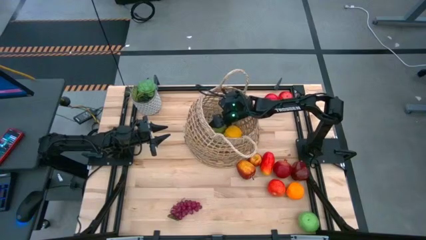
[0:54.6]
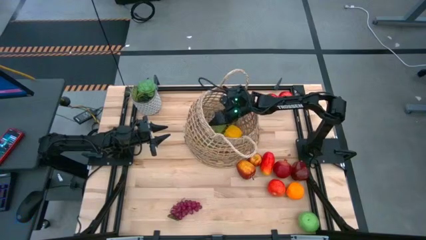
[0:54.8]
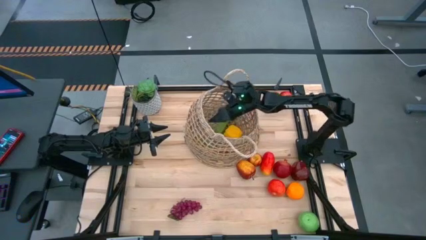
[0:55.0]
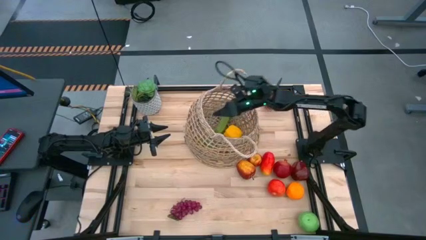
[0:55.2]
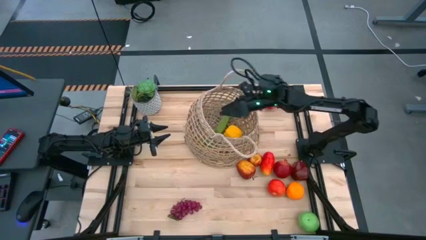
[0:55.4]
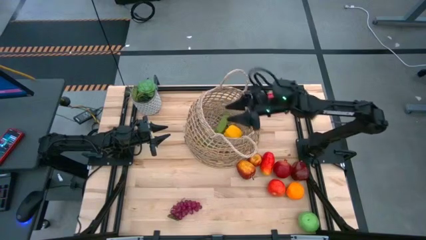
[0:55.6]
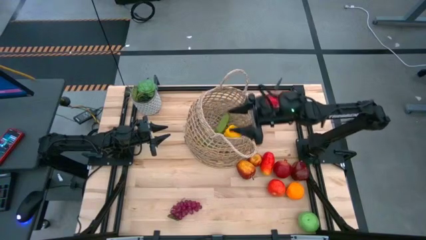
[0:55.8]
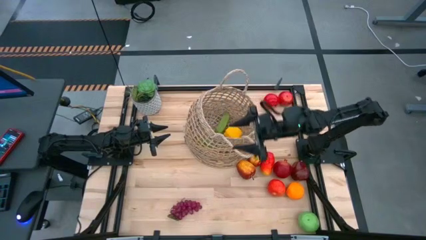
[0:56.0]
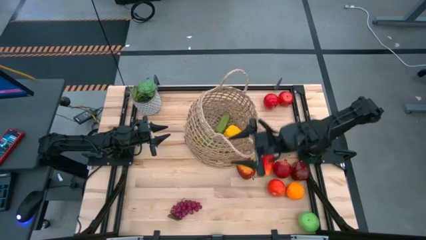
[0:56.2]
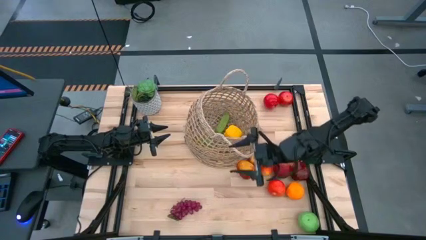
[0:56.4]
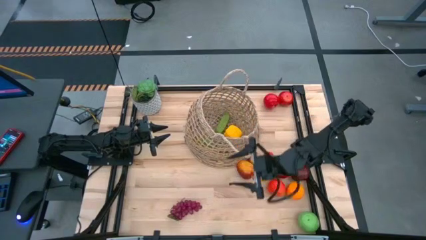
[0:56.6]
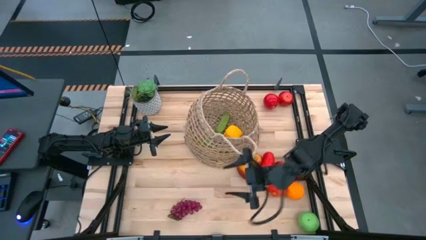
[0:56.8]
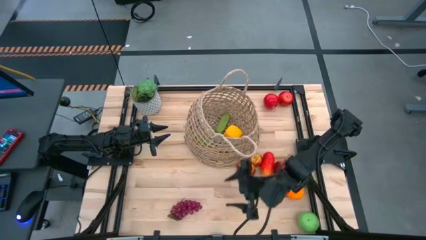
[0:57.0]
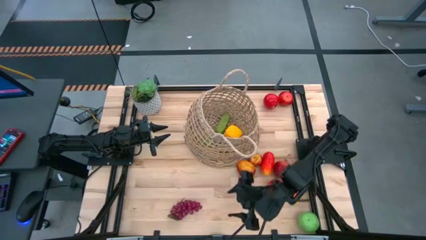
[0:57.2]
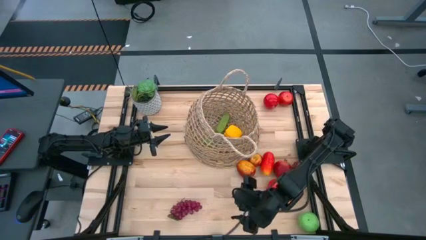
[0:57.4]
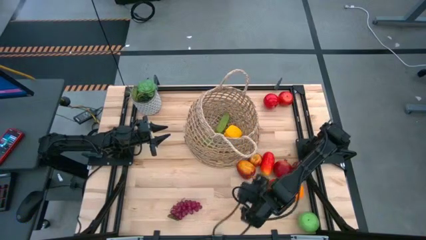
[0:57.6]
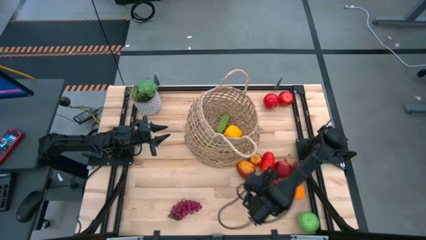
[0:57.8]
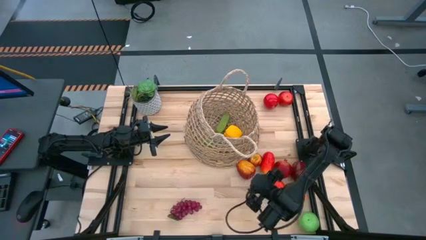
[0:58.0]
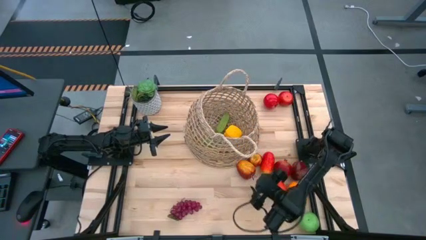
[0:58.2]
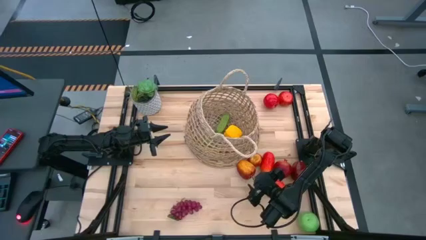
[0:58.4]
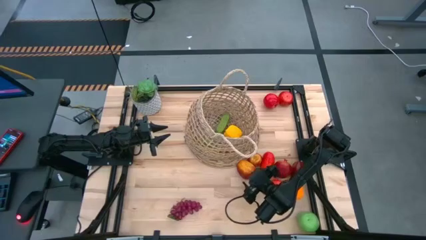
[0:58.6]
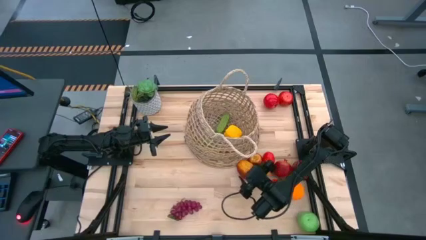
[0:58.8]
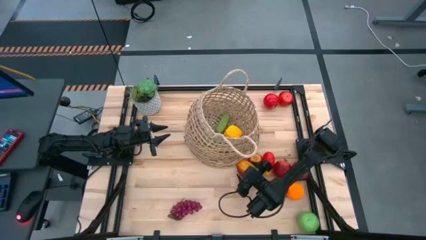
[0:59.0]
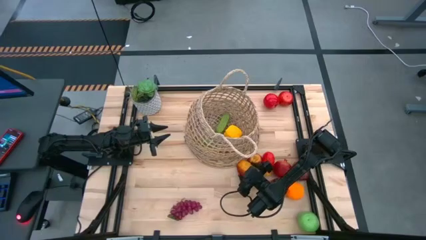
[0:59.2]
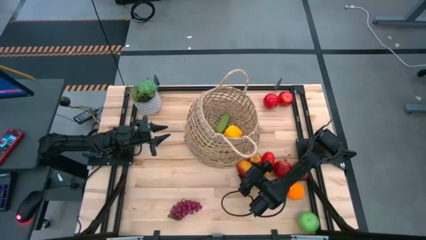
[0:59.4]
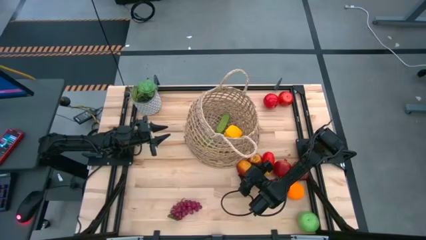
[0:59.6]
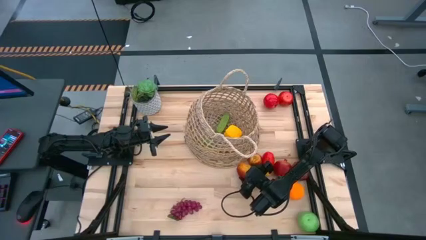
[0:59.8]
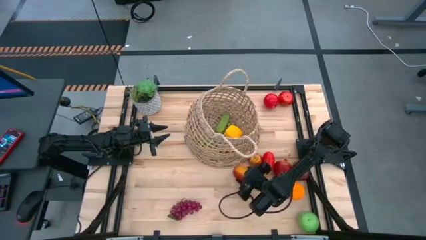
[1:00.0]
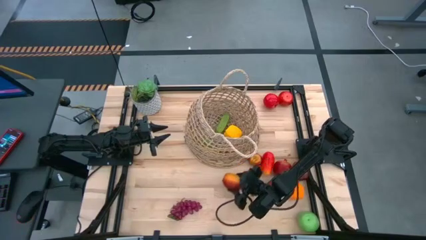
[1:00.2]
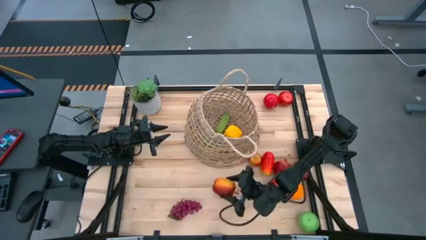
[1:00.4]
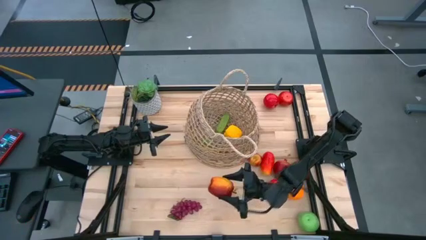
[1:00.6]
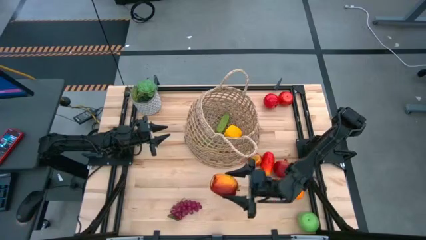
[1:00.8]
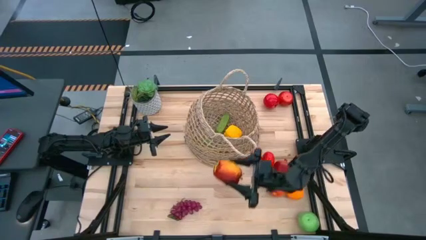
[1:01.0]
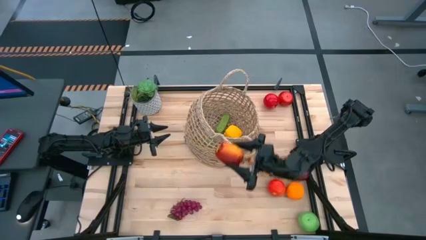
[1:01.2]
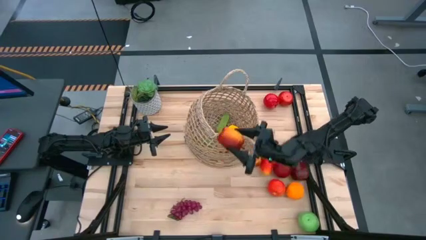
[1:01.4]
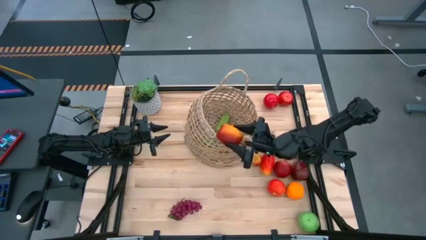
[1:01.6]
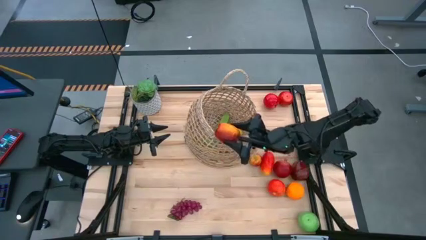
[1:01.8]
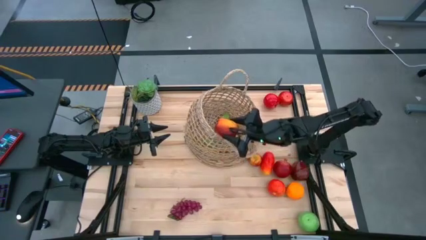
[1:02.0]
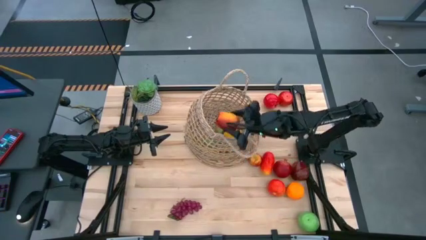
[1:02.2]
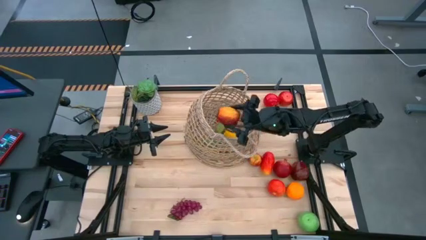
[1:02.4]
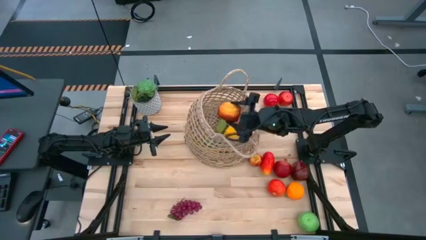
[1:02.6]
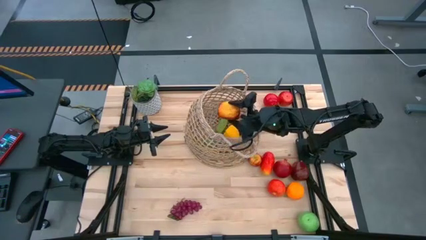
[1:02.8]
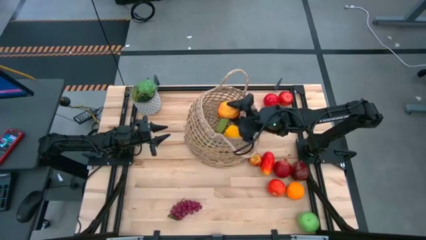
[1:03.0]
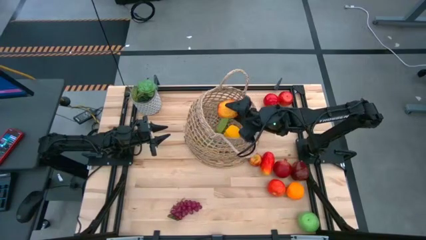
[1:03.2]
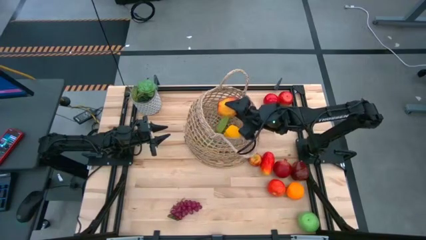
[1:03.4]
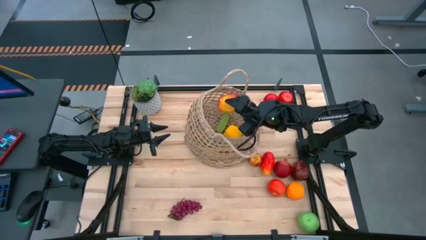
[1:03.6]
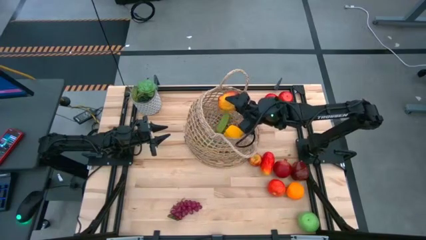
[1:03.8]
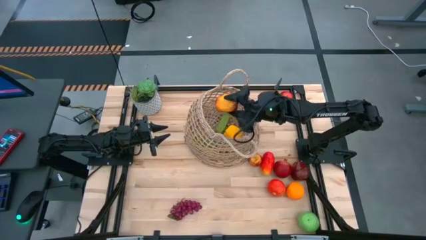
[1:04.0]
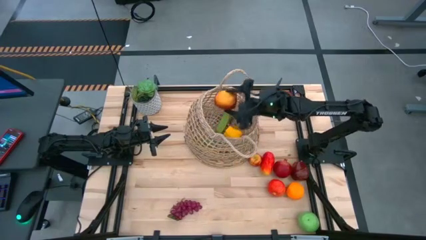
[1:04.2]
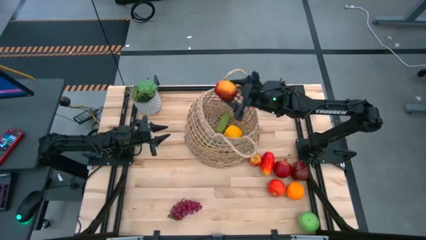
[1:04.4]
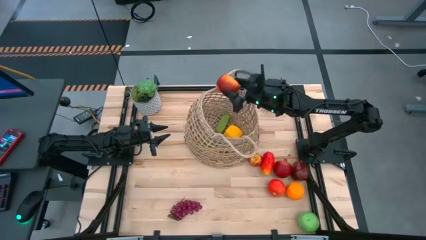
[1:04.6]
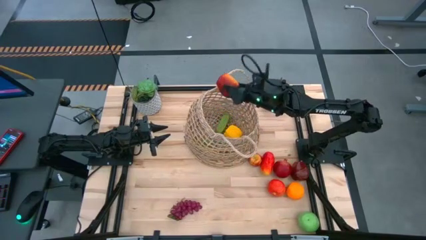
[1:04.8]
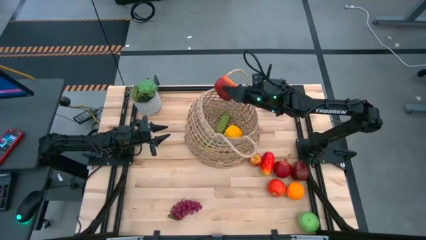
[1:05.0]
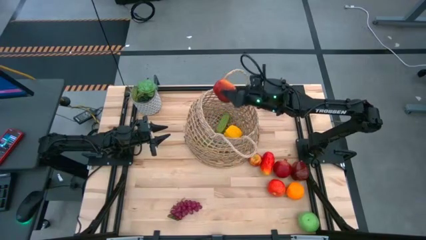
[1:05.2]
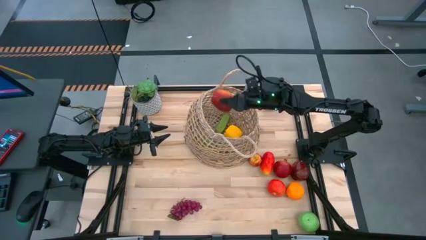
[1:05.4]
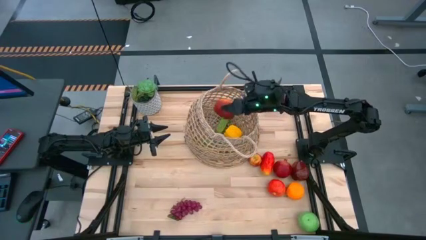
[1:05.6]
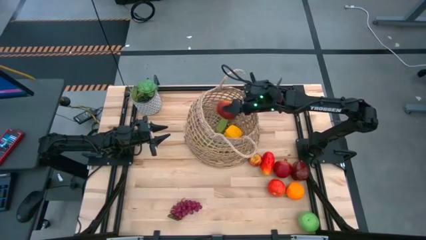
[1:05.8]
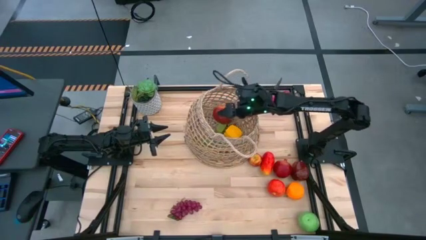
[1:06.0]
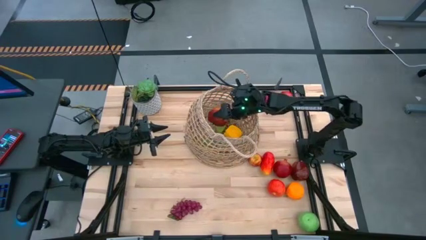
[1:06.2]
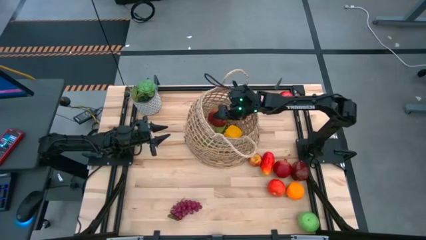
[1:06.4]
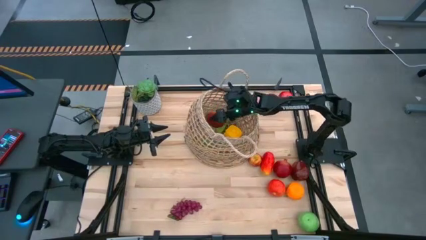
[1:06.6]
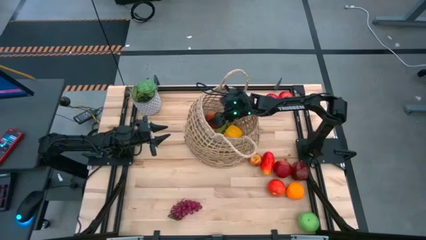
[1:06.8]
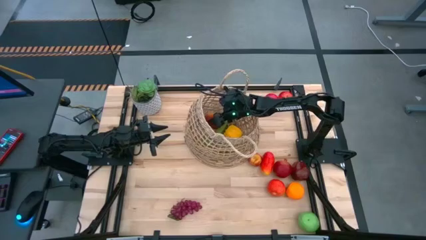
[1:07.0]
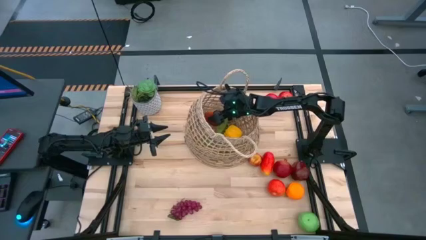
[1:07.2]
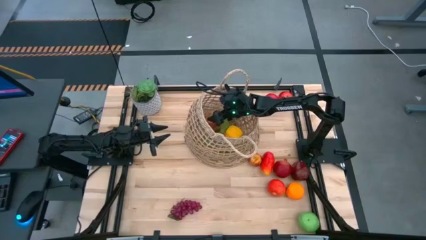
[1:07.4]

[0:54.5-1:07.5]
Task: Build produce basket
Put the red malay apple into the brown basket
